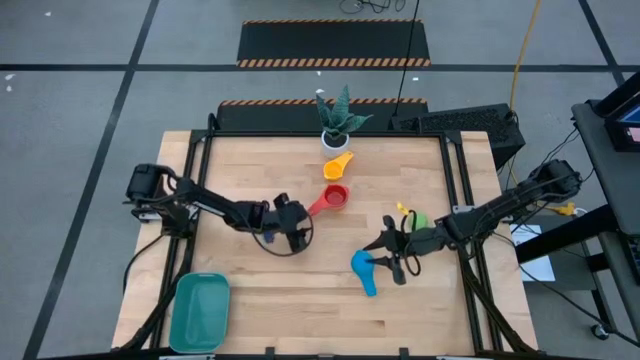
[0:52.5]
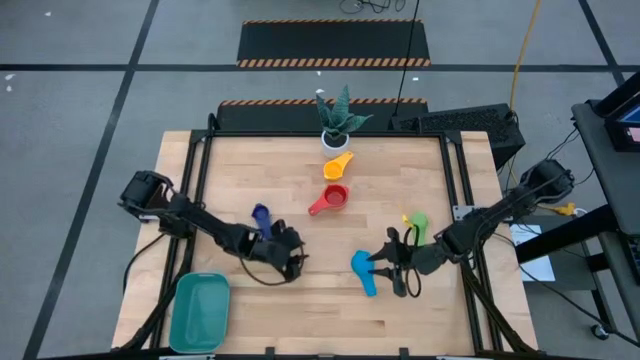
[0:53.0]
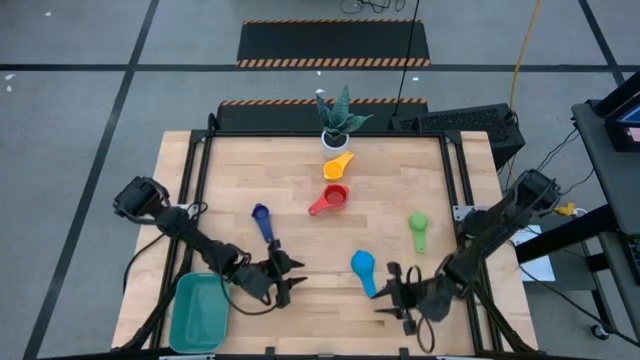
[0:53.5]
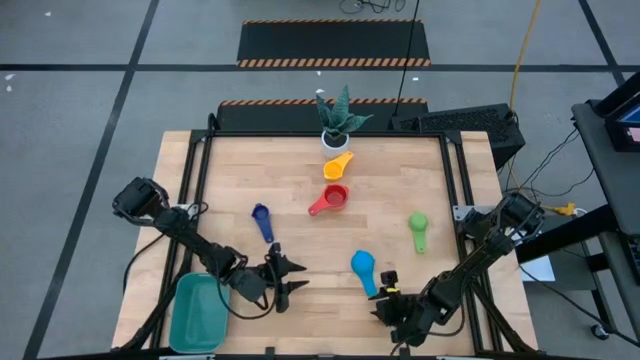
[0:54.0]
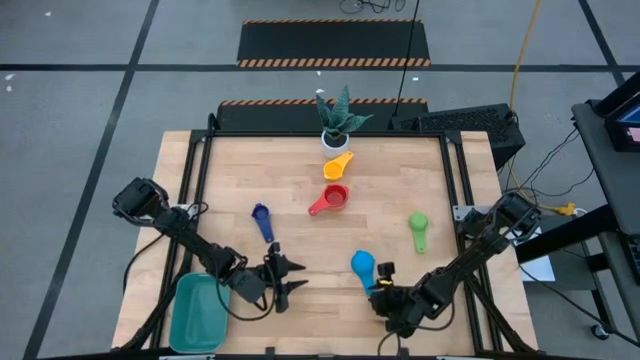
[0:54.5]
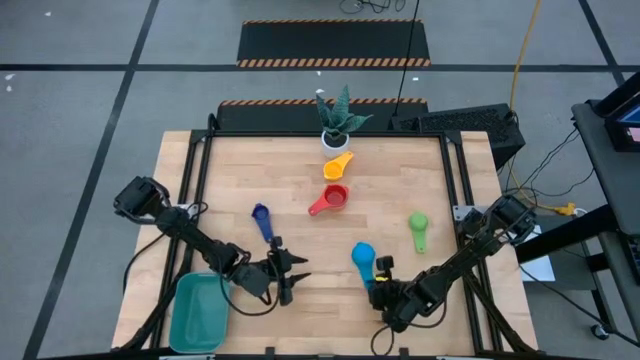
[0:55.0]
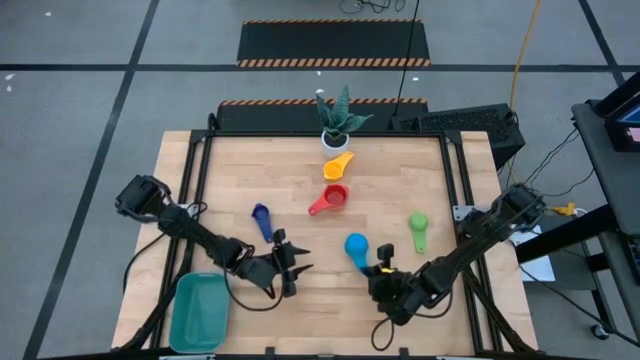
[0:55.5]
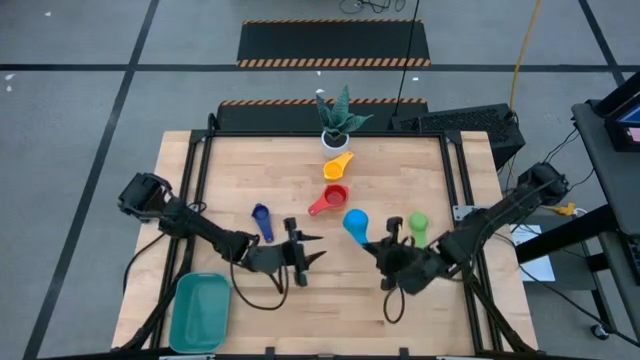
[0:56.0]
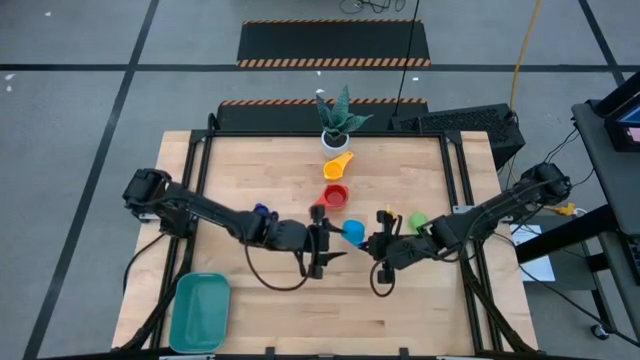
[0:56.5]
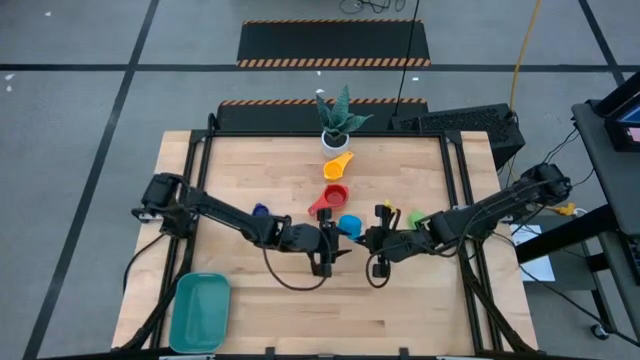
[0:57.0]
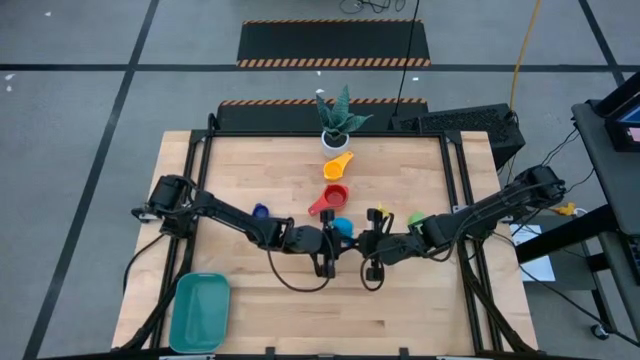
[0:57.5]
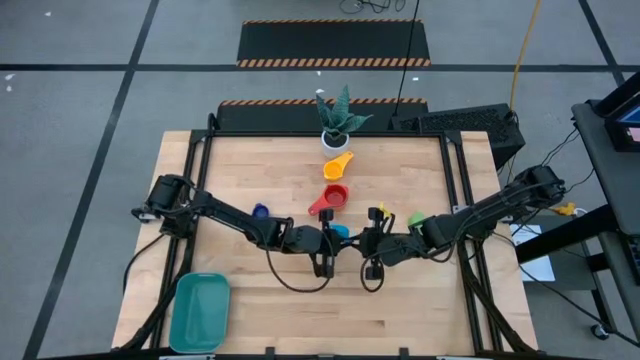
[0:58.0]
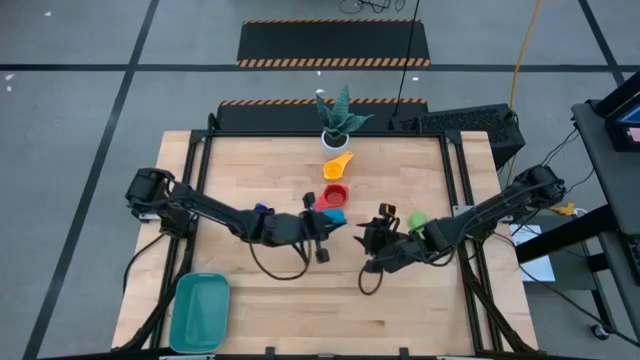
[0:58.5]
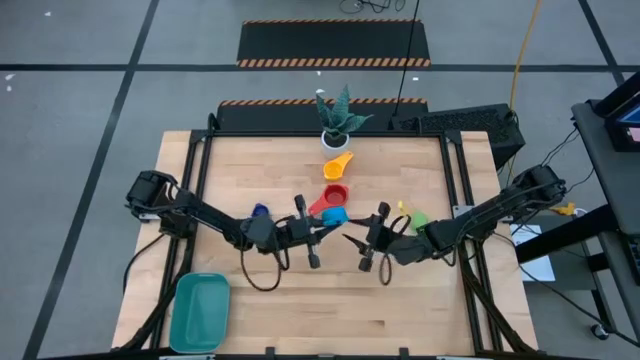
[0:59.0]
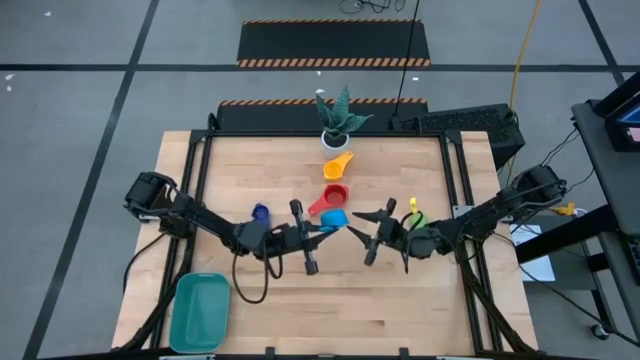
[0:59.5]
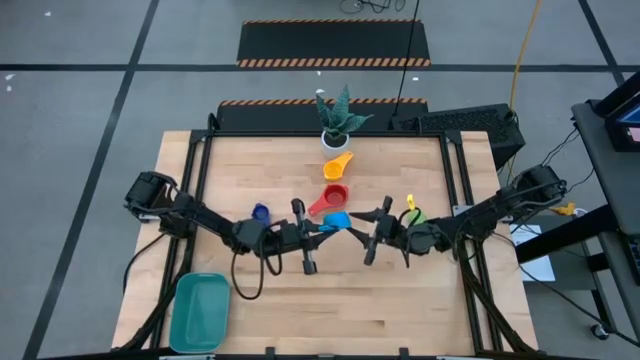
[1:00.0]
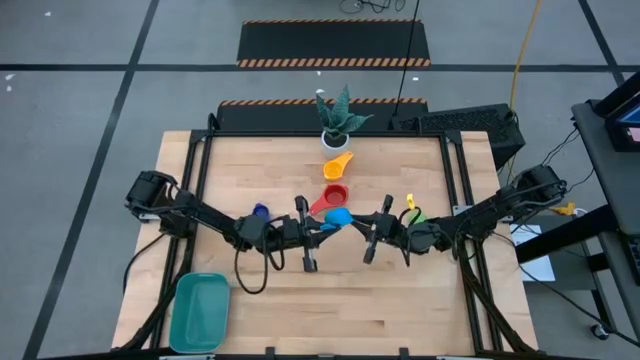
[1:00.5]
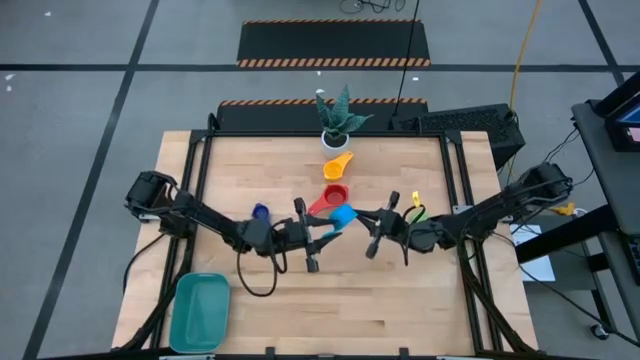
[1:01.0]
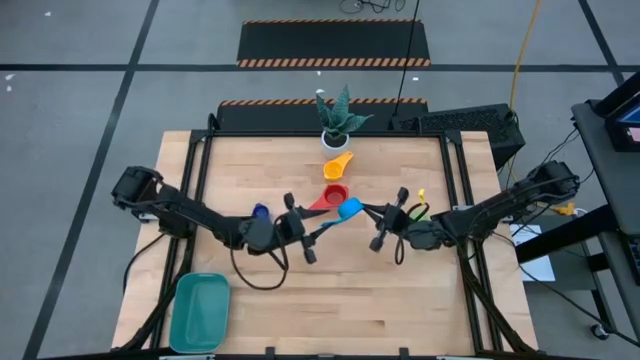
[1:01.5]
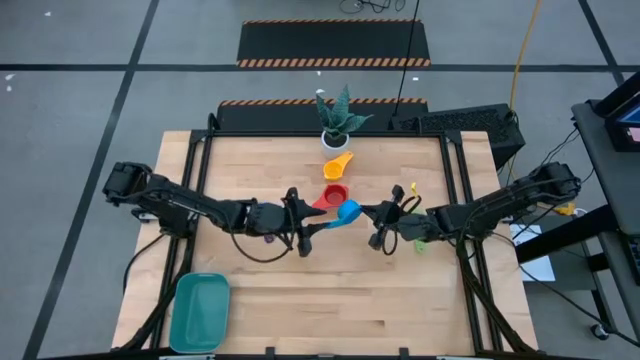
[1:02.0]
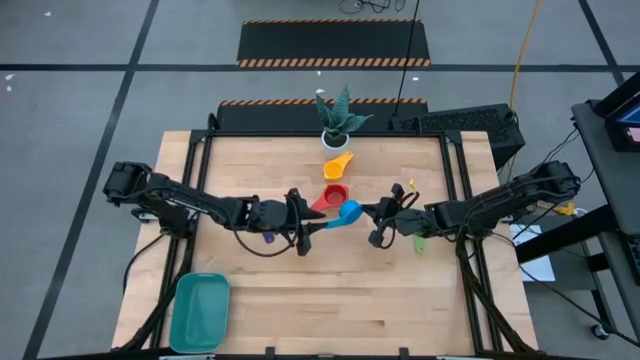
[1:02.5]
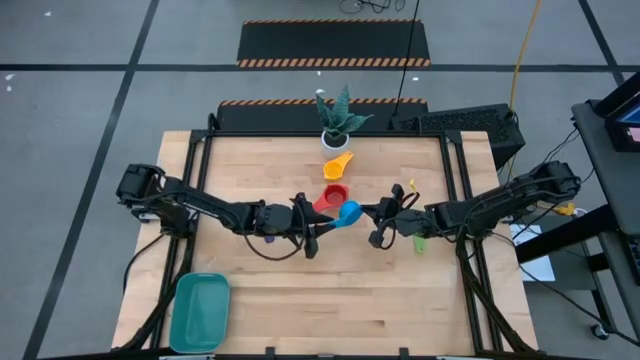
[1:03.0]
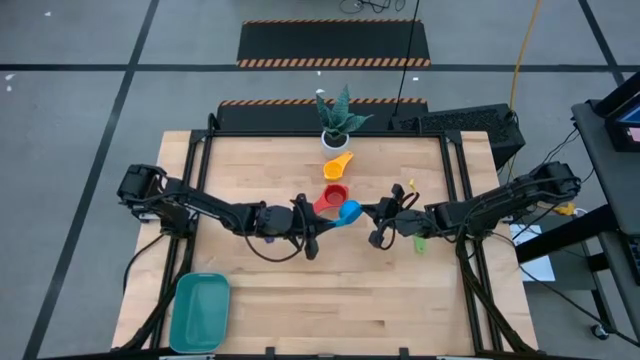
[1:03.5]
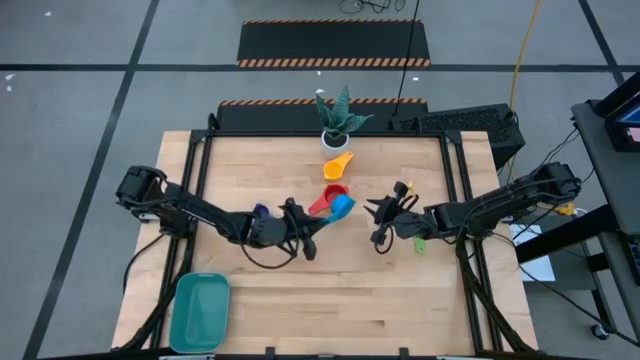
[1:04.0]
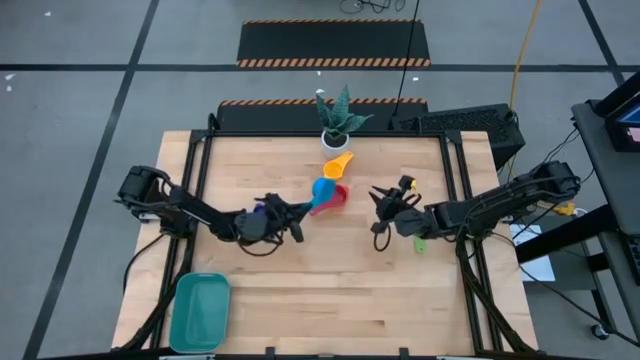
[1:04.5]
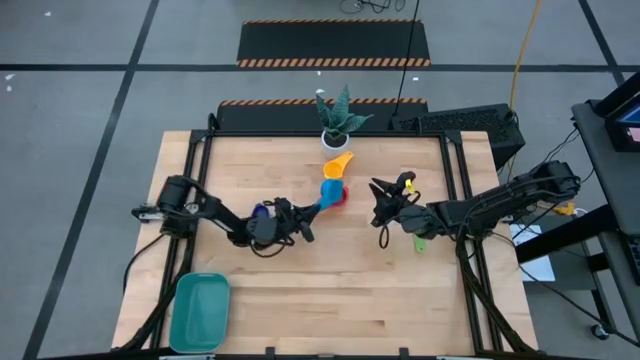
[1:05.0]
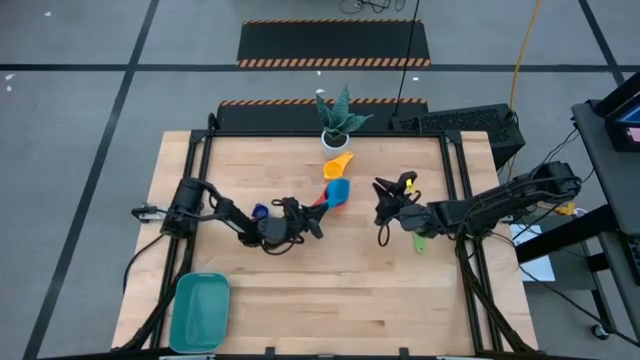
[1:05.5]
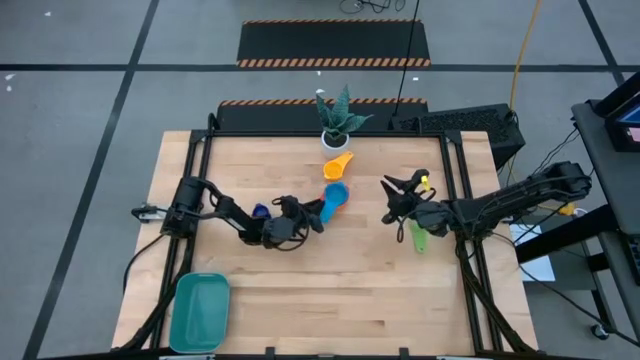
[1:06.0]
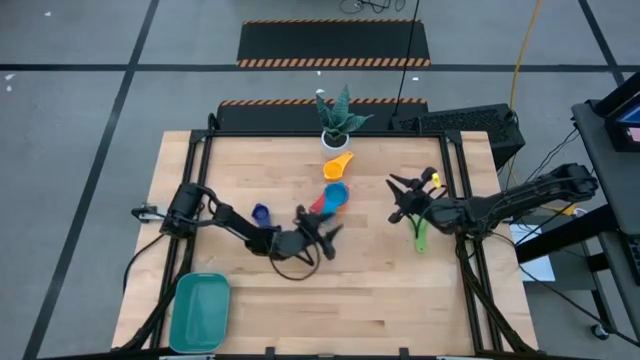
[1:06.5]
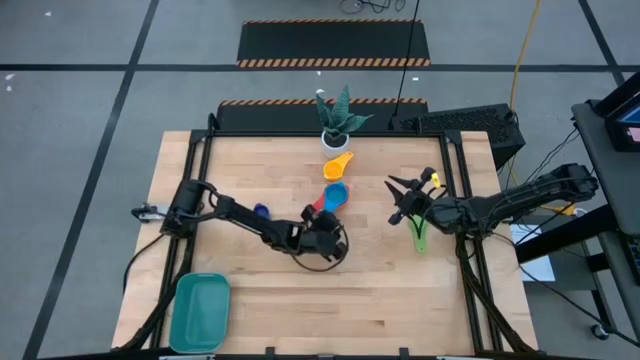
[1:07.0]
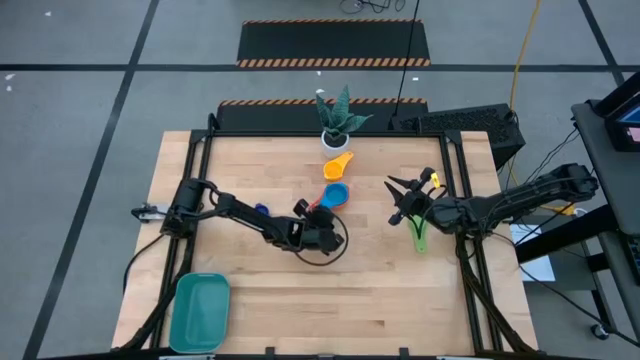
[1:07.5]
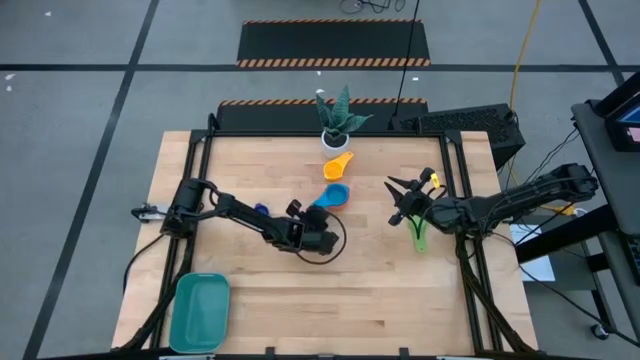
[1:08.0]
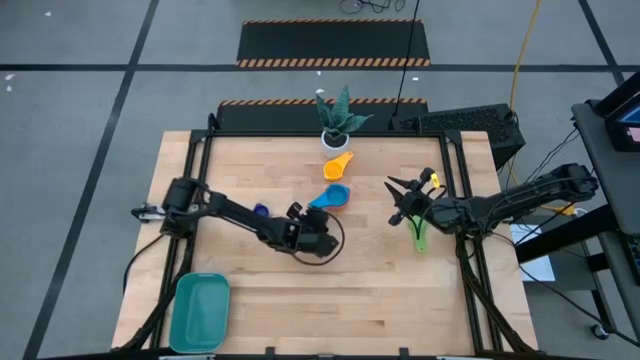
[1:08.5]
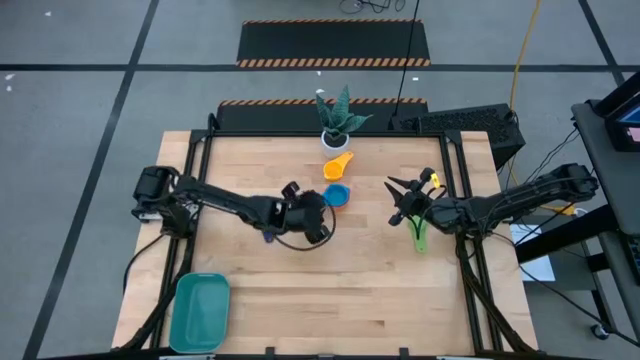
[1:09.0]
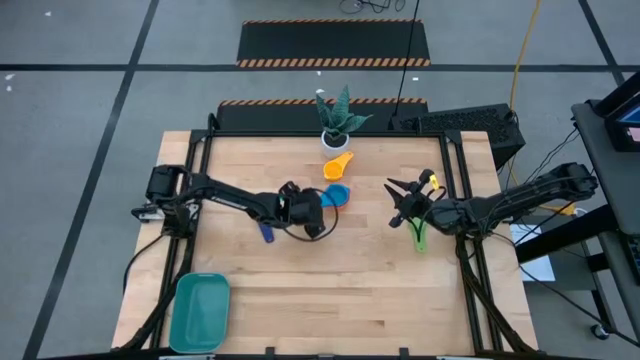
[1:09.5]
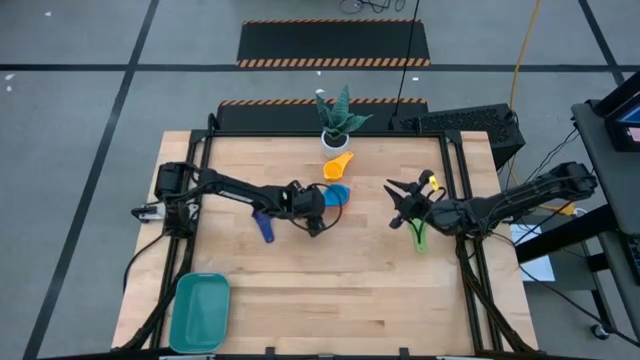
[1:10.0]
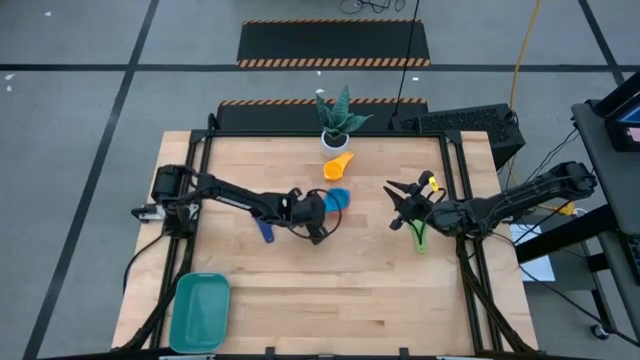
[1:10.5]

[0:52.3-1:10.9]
Task: Nest measuring cups in basket
Stack the light blue measuring cup on the red measuring cup

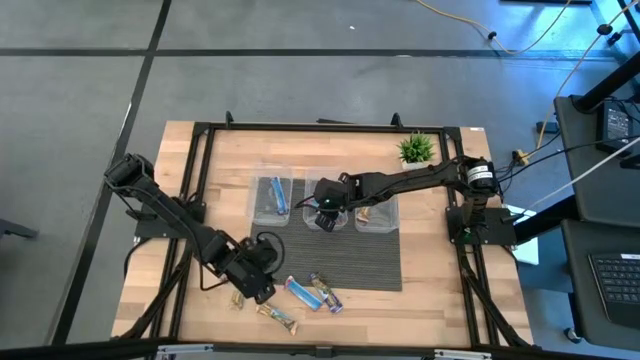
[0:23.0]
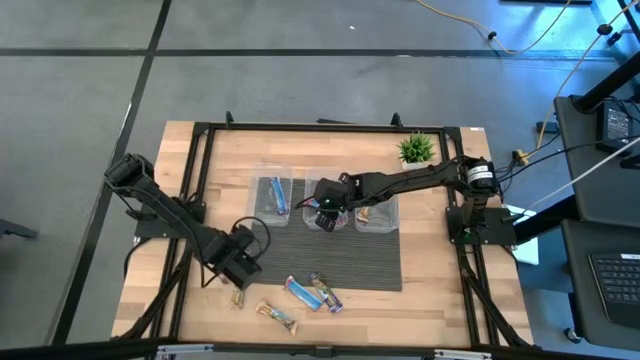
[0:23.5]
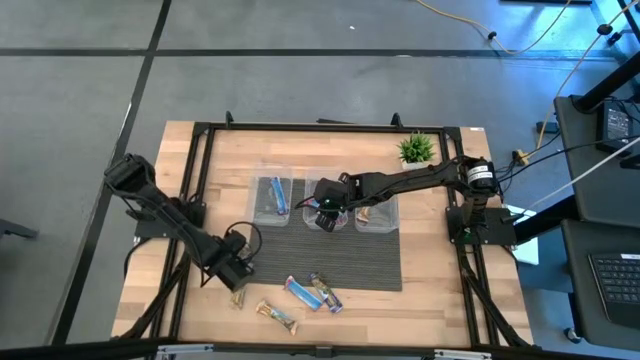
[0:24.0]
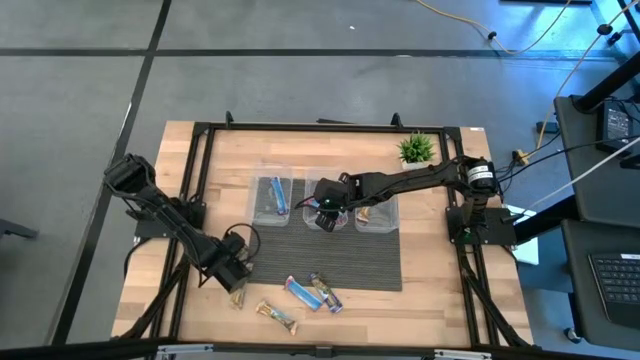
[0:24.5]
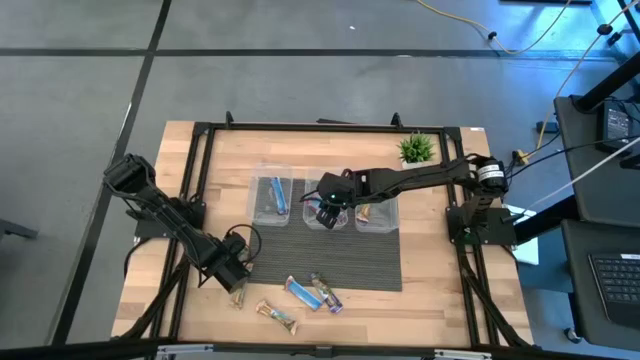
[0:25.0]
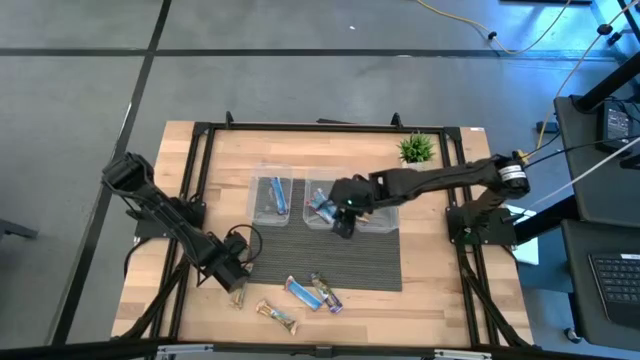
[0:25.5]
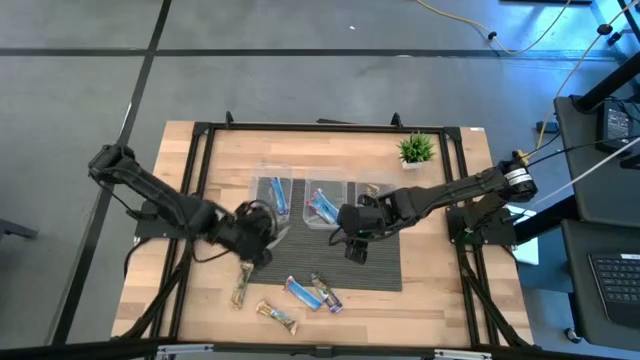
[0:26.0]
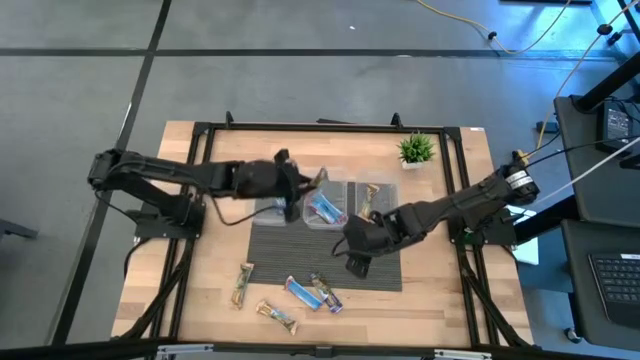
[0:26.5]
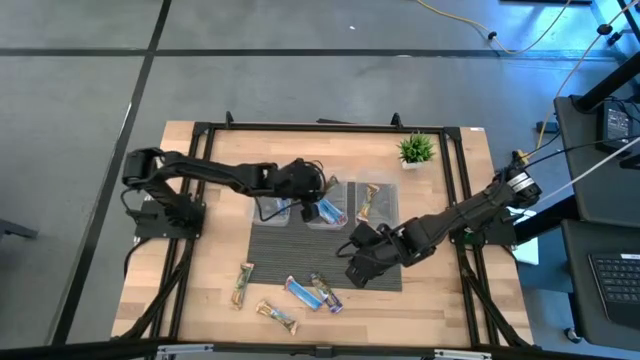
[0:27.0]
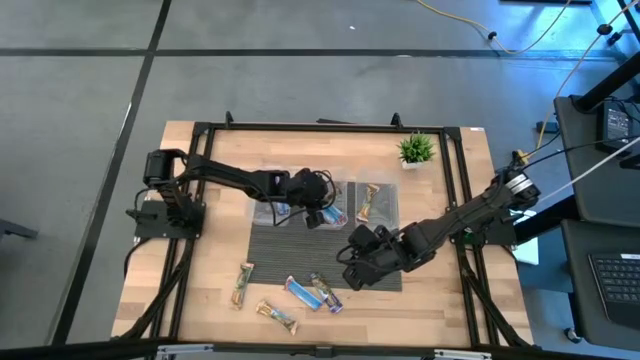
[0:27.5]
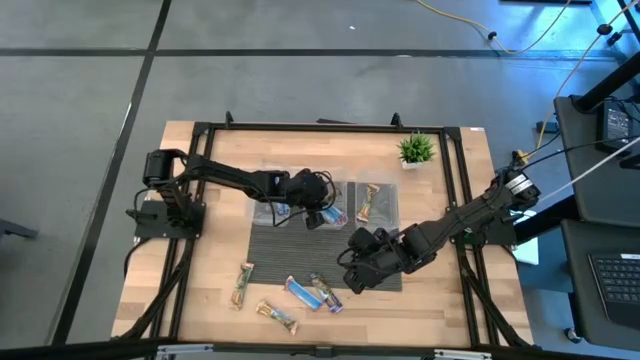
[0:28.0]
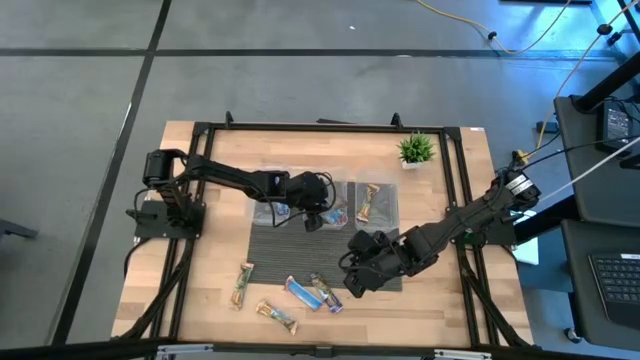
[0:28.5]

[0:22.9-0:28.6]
Task: Pick and place Granola Bars by type
Put the red granola bar into the middle transparent bin
